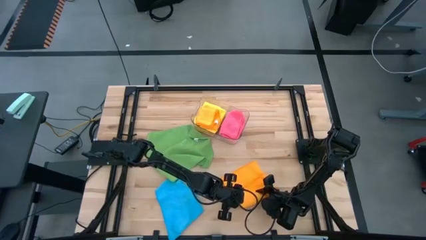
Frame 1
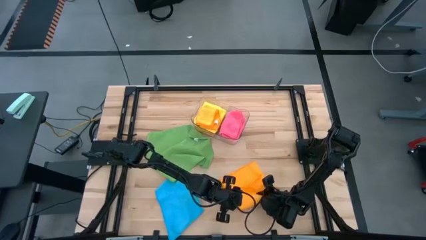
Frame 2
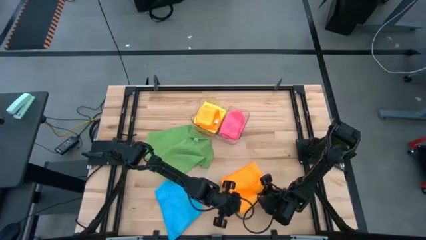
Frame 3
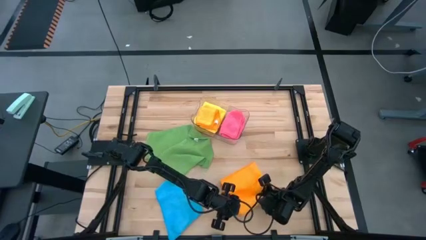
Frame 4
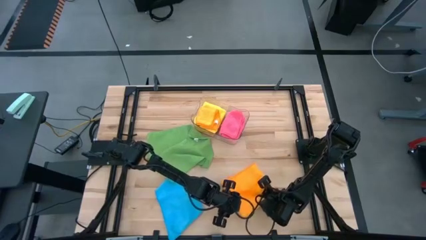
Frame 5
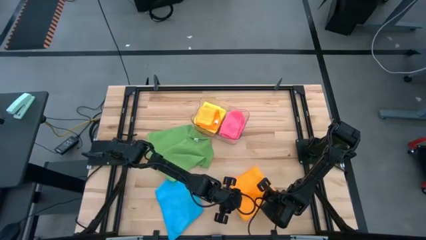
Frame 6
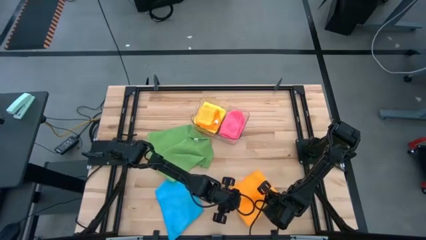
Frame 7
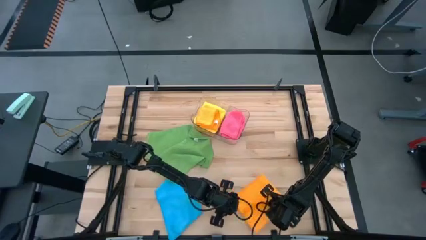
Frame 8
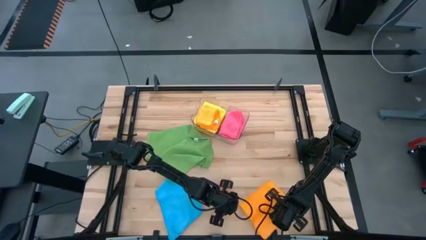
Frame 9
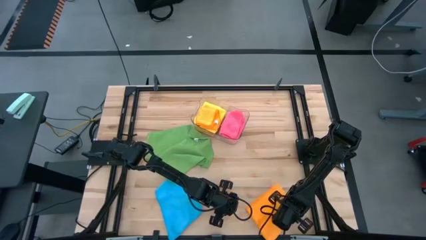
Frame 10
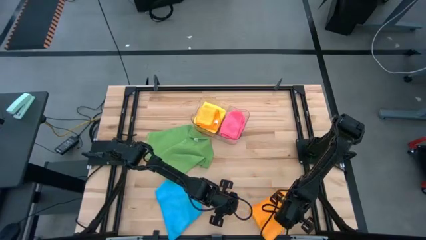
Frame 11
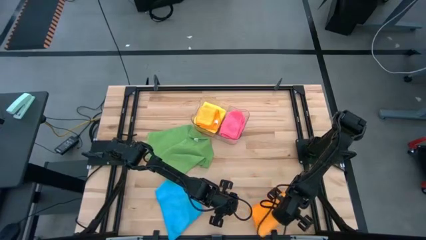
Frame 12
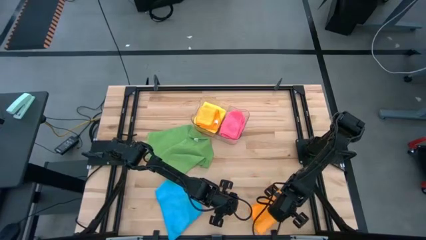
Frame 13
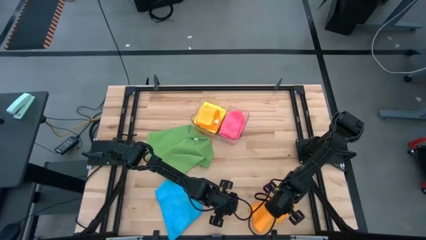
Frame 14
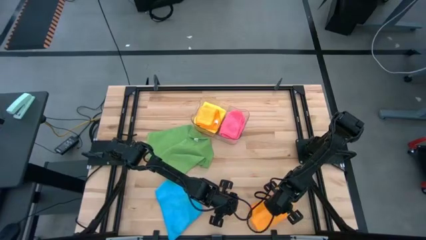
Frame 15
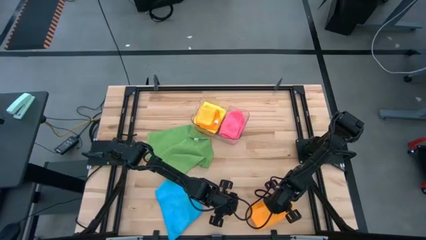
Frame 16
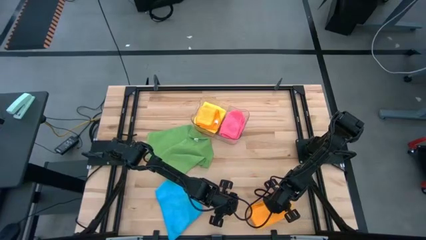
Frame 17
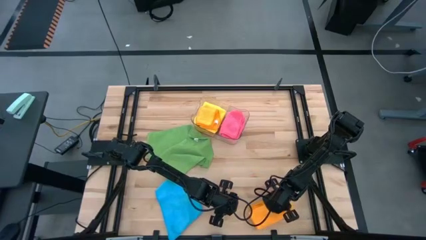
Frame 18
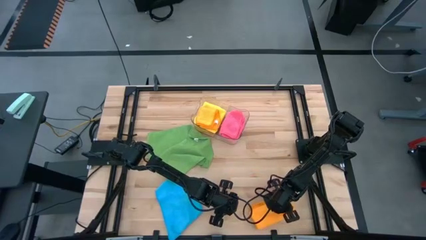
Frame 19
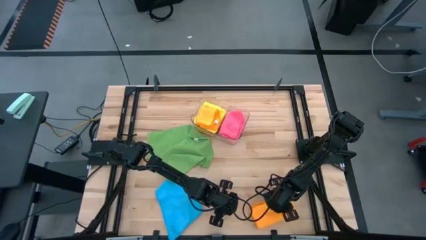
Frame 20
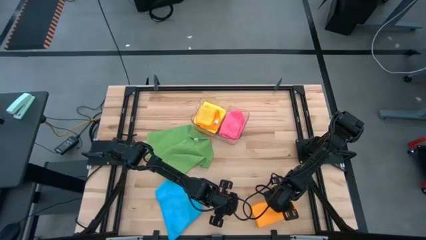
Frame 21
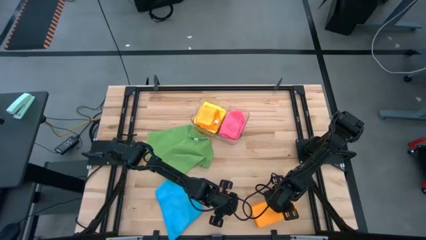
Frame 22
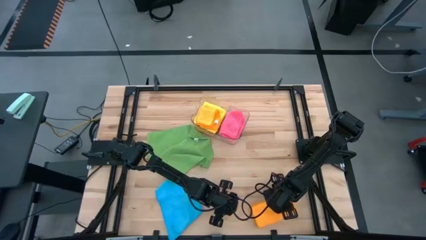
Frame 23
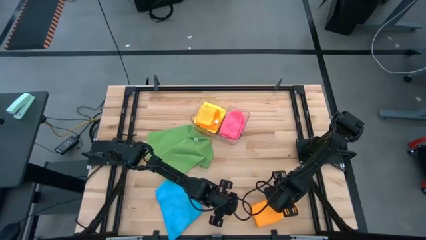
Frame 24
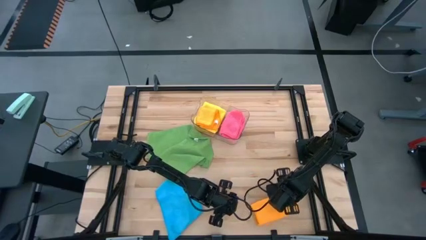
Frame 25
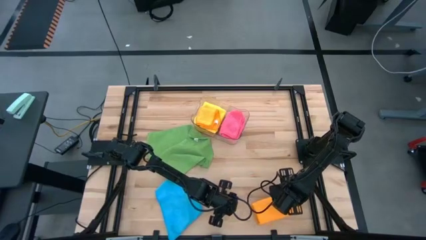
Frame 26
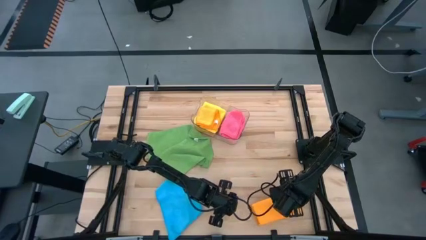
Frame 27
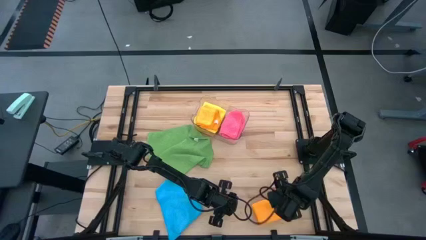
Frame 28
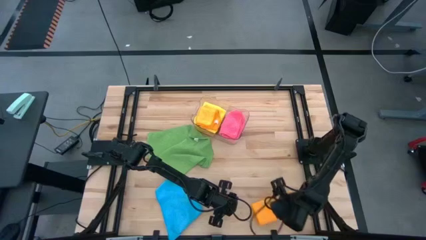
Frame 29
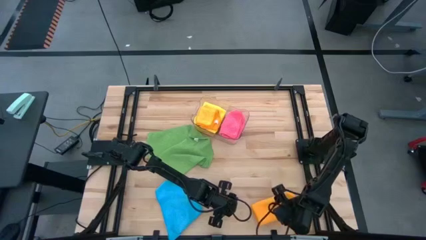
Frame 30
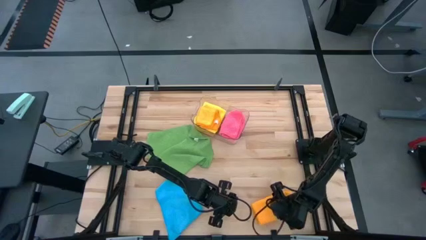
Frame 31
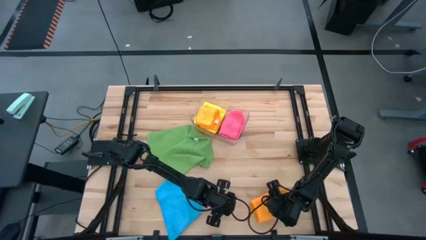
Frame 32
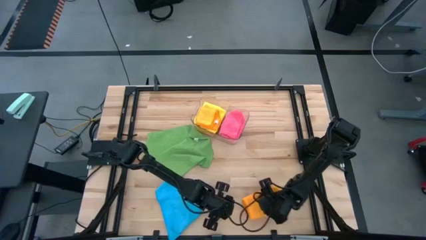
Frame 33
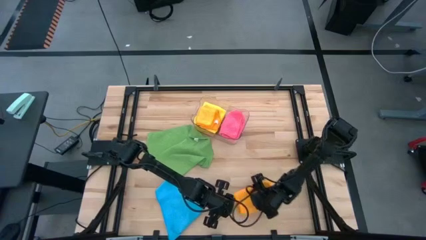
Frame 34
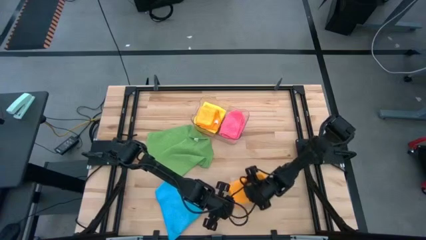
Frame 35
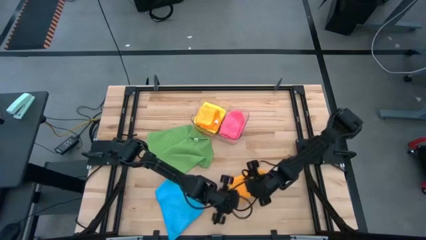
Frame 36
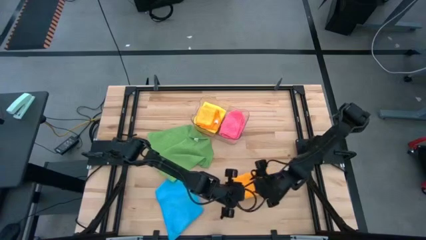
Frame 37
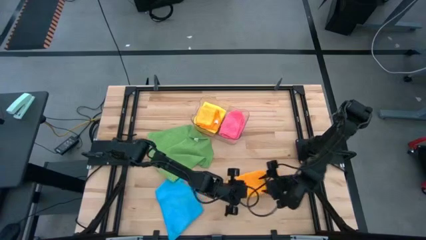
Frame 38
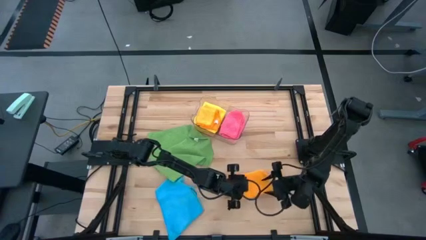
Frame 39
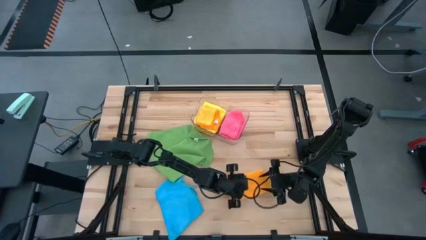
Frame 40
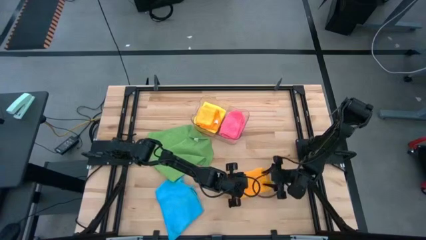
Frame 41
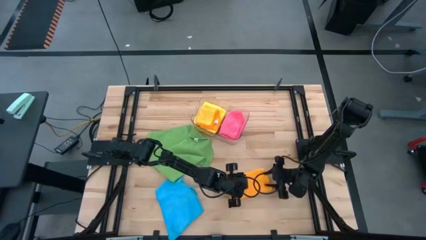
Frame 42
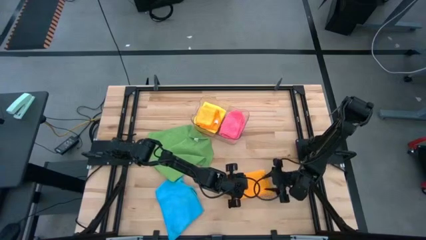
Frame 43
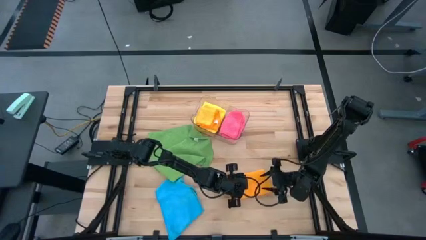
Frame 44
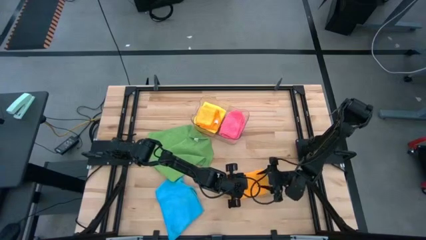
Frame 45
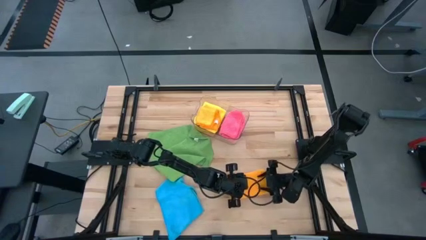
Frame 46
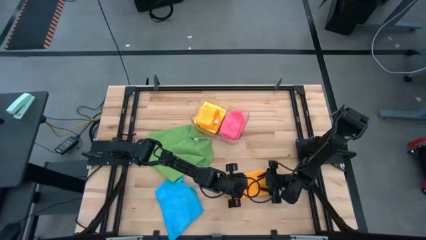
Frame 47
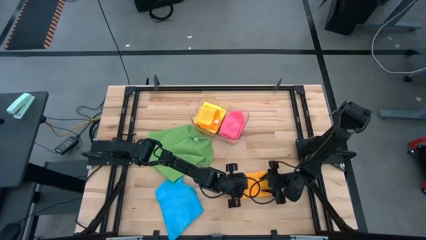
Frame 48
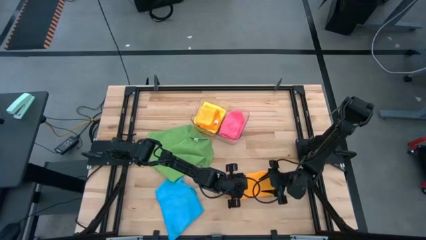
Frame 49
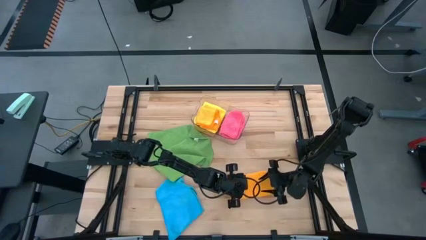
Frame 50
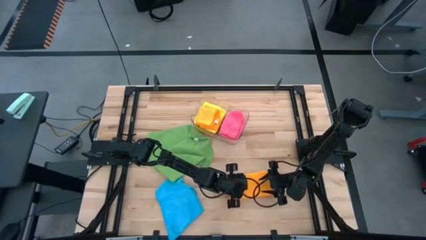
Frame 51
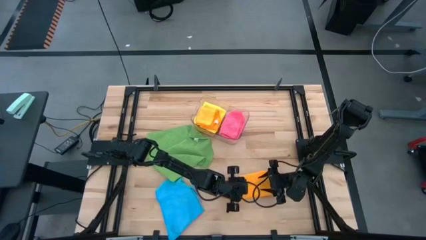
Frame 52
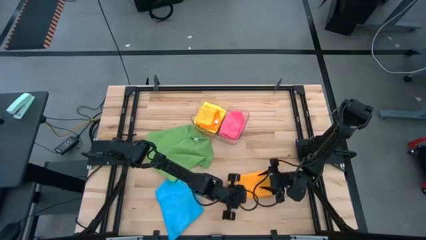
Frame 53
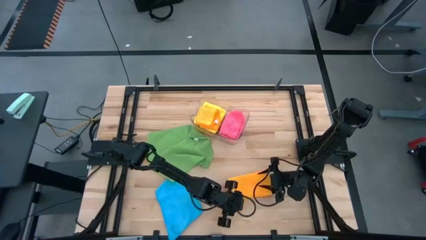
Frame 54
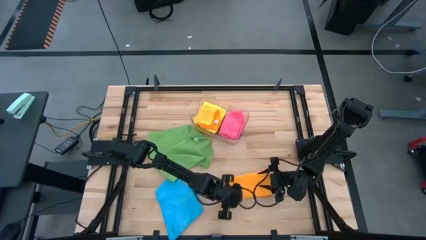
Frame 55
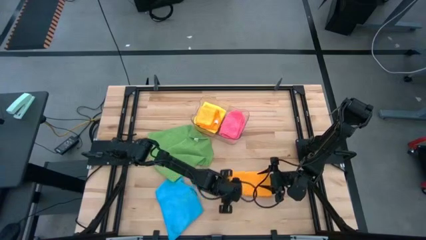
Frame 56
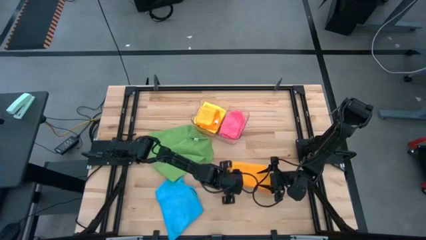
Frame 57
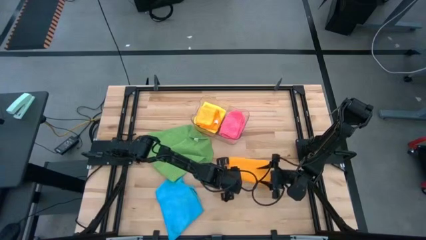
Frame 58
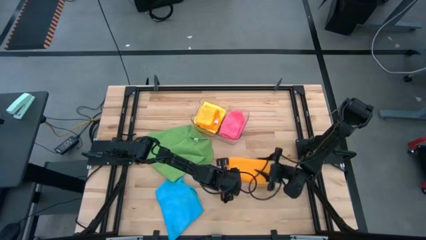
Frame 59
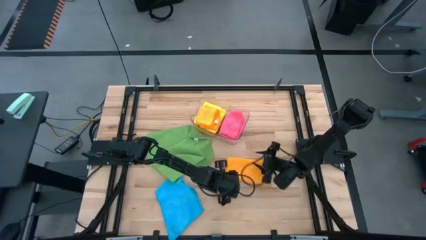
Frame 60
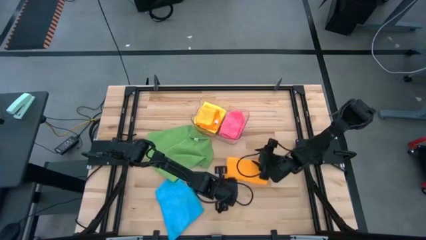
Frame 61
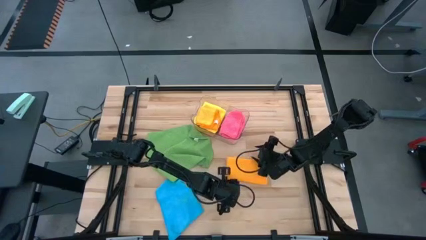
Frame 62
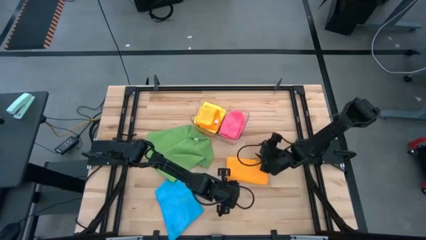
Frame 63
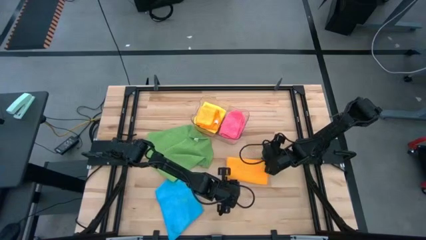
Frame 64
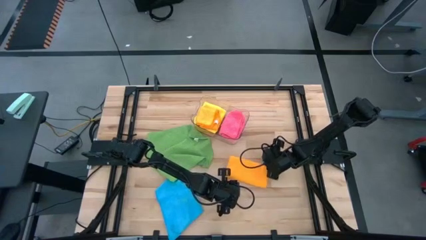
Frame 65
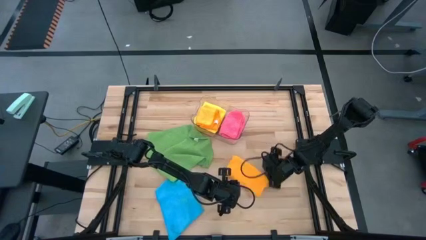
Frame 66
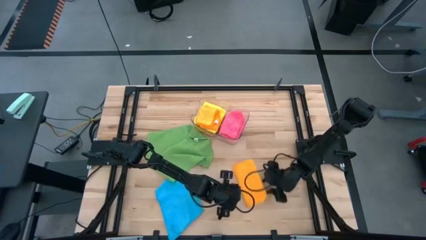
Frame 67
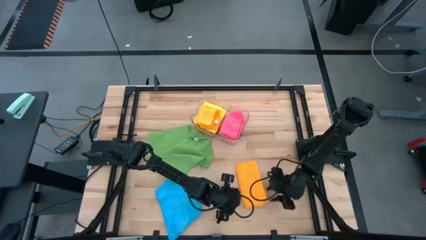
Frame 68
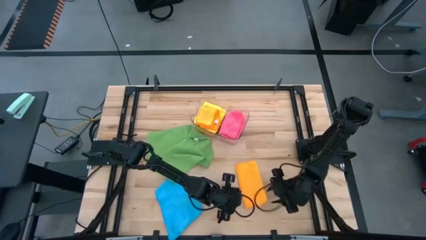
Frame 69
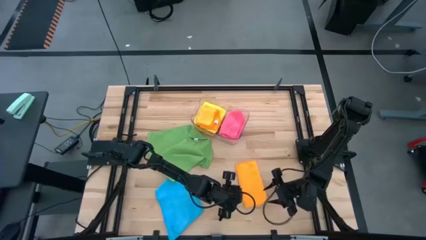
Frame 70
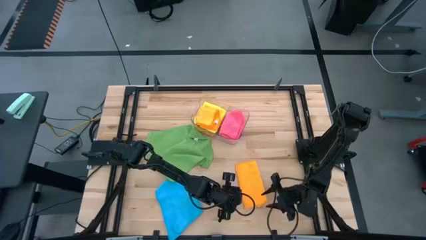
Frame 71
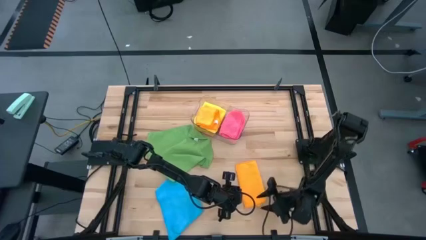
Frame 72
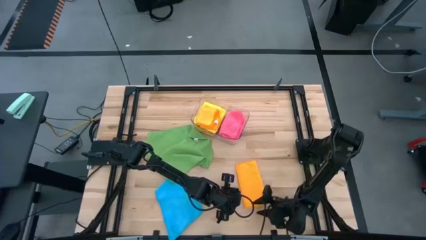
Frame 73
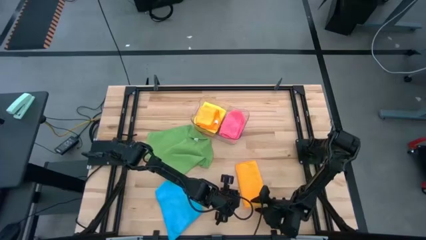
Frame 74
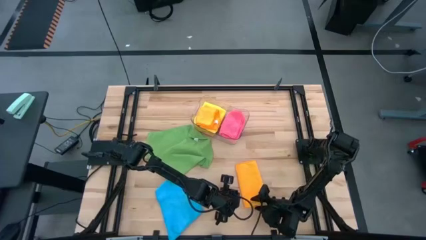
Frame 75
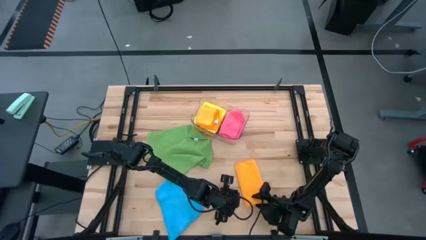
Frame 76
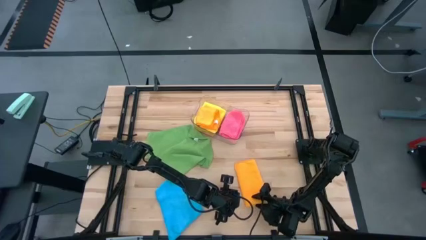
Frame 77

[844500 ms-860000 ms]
Task: Fold microfiber towels
Fold the orange microfiber cloth
